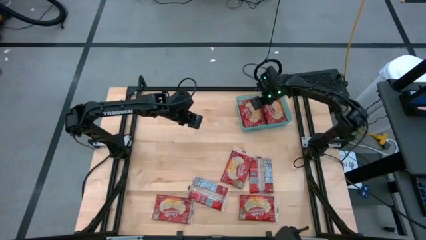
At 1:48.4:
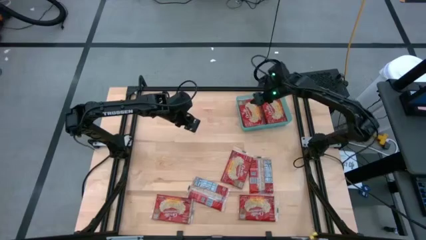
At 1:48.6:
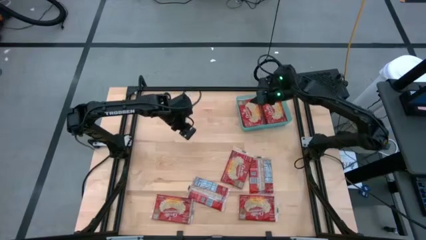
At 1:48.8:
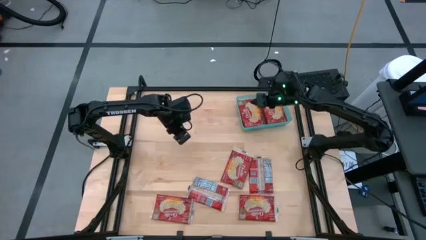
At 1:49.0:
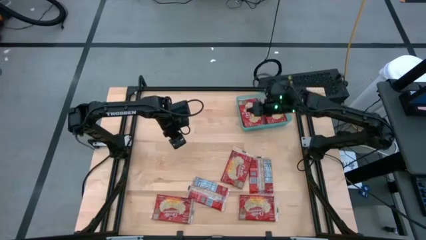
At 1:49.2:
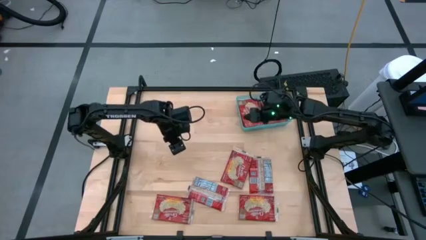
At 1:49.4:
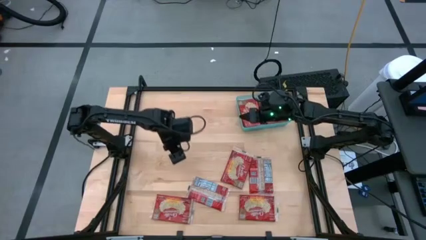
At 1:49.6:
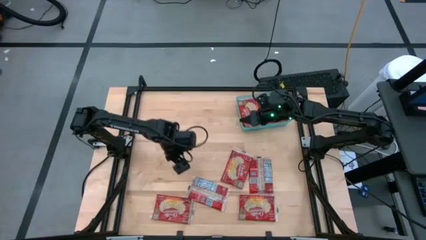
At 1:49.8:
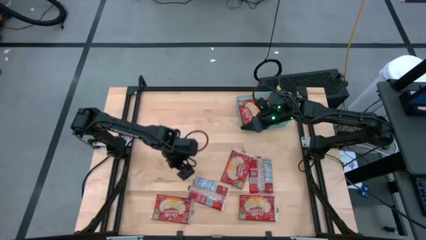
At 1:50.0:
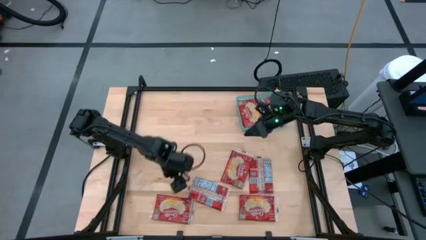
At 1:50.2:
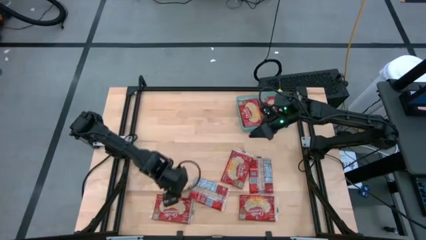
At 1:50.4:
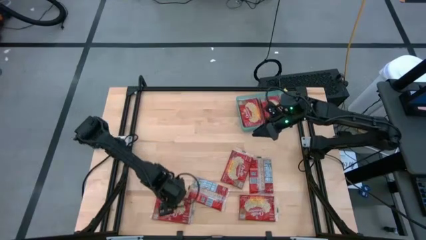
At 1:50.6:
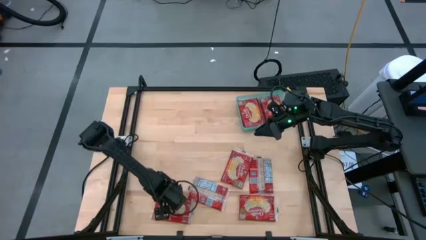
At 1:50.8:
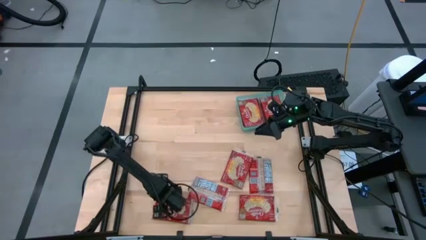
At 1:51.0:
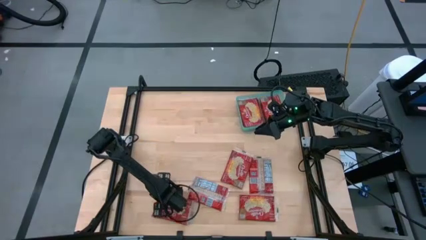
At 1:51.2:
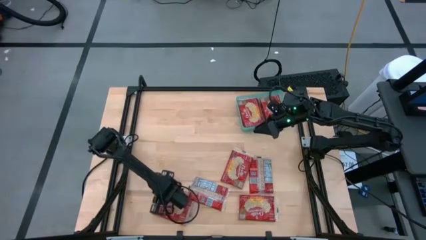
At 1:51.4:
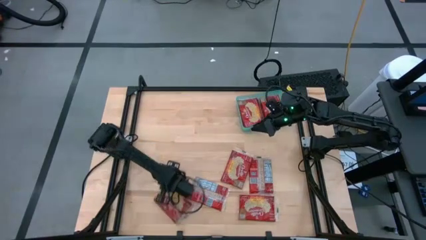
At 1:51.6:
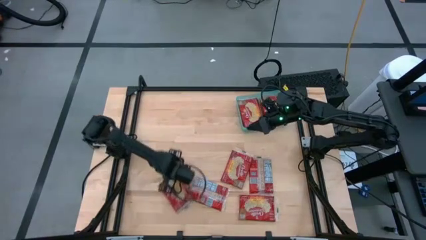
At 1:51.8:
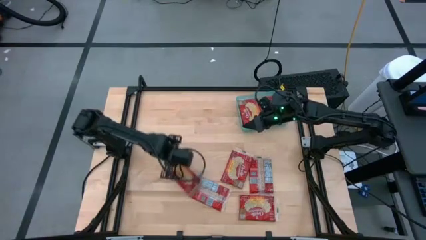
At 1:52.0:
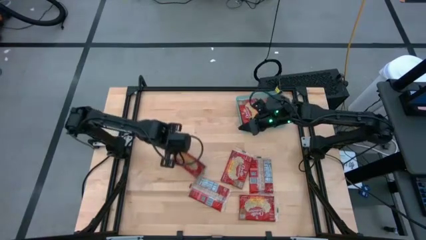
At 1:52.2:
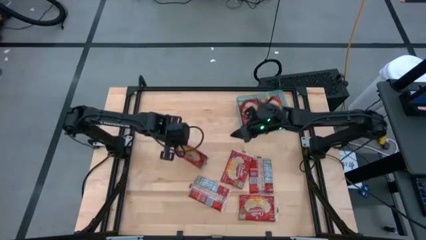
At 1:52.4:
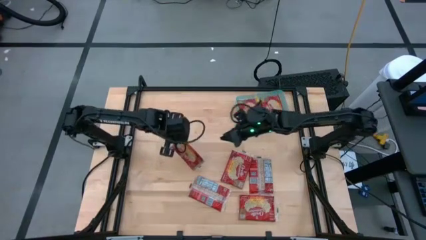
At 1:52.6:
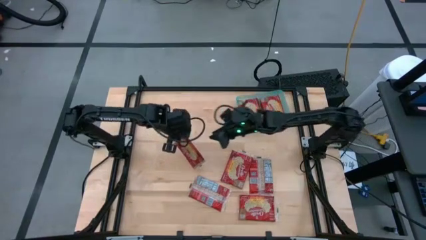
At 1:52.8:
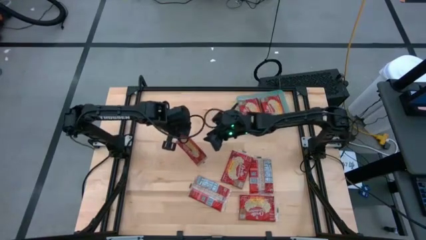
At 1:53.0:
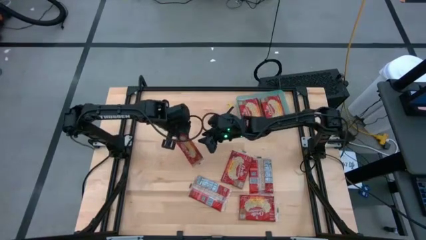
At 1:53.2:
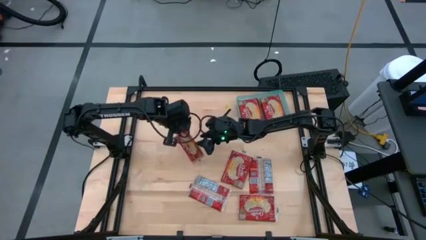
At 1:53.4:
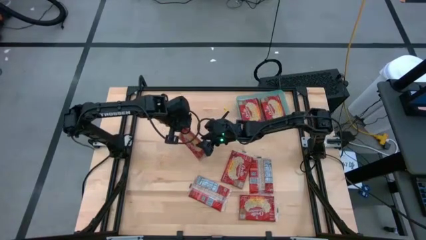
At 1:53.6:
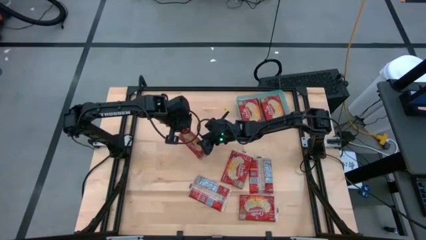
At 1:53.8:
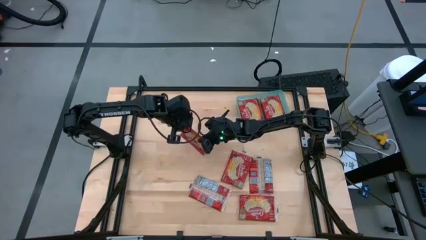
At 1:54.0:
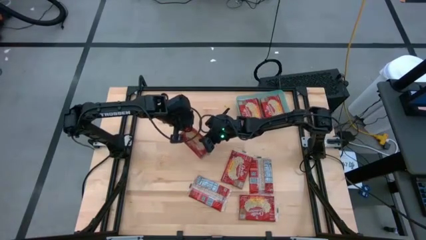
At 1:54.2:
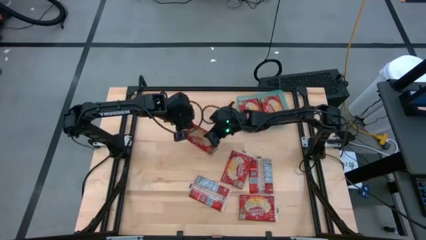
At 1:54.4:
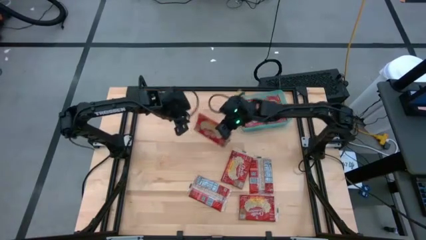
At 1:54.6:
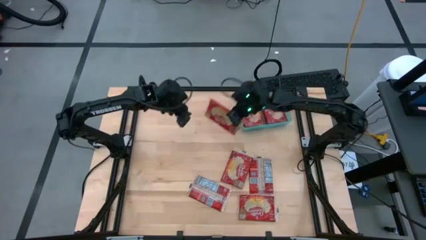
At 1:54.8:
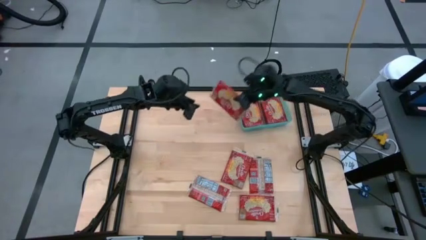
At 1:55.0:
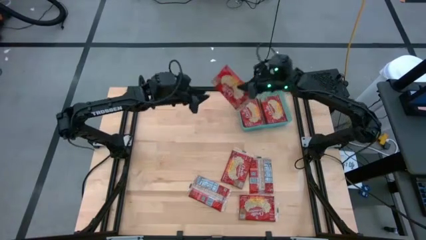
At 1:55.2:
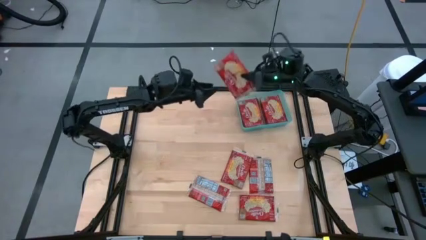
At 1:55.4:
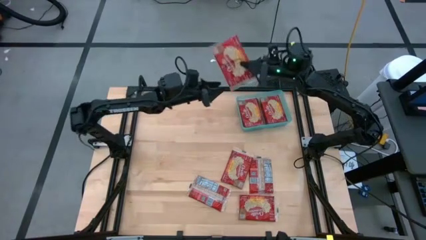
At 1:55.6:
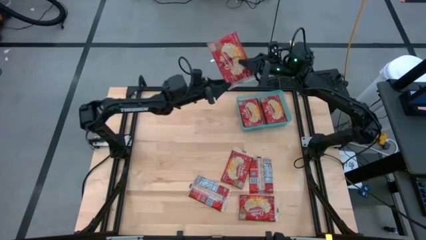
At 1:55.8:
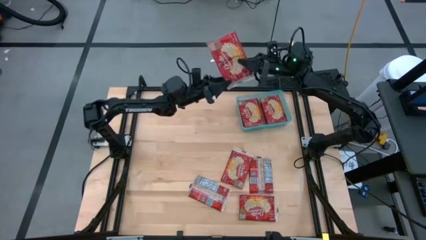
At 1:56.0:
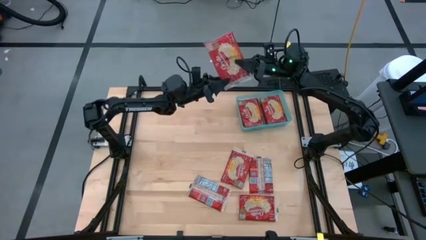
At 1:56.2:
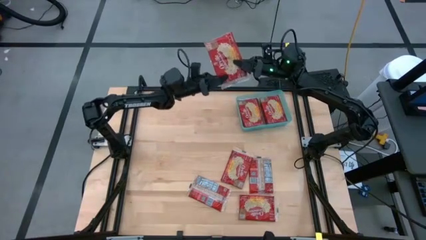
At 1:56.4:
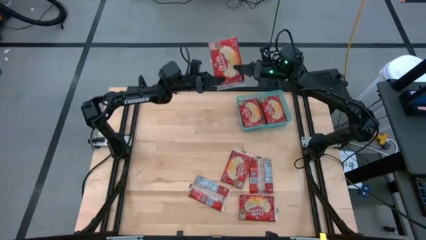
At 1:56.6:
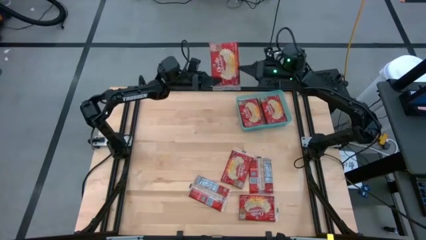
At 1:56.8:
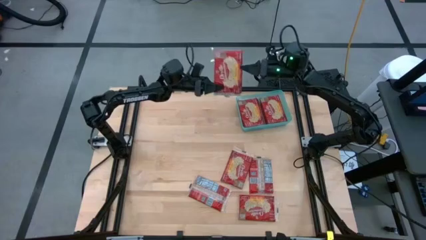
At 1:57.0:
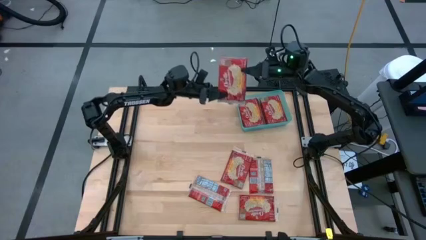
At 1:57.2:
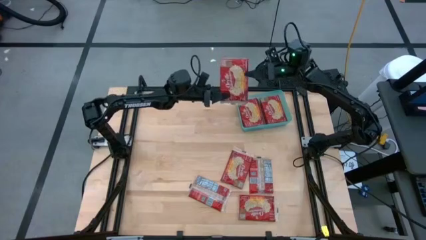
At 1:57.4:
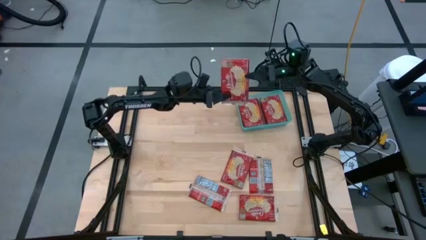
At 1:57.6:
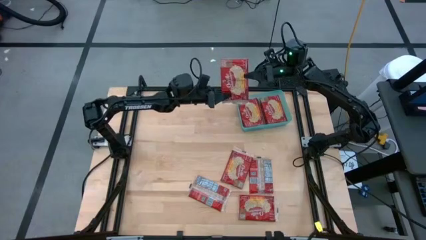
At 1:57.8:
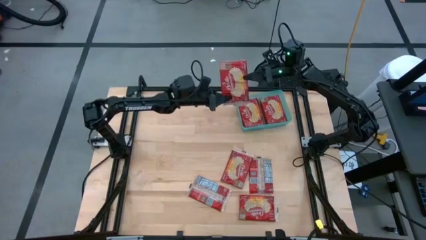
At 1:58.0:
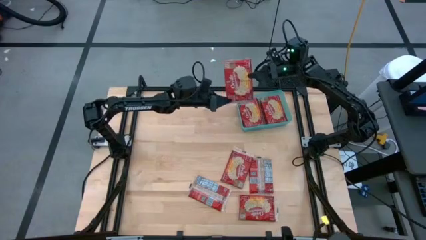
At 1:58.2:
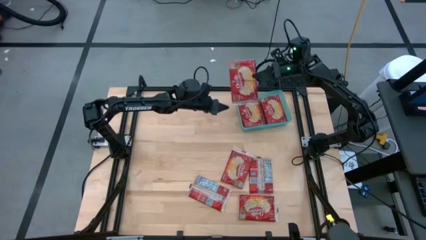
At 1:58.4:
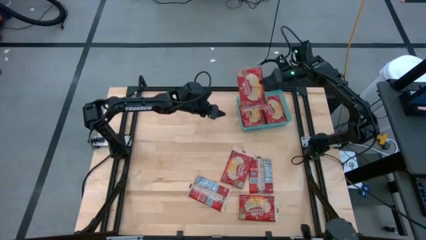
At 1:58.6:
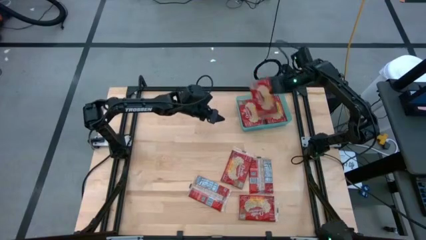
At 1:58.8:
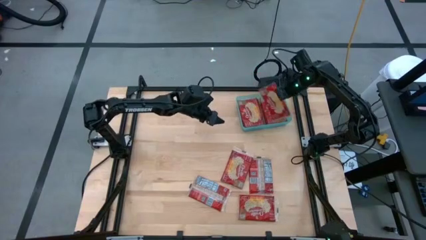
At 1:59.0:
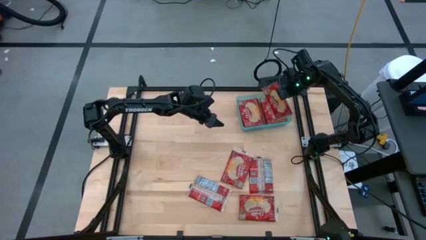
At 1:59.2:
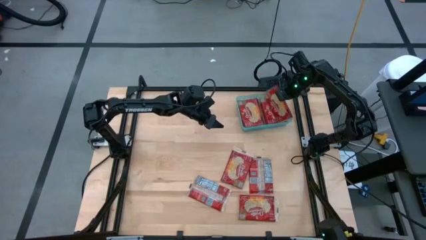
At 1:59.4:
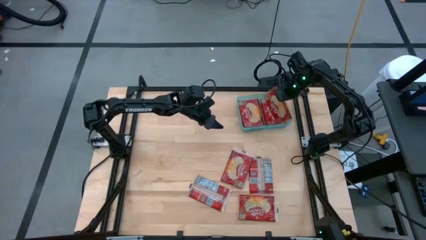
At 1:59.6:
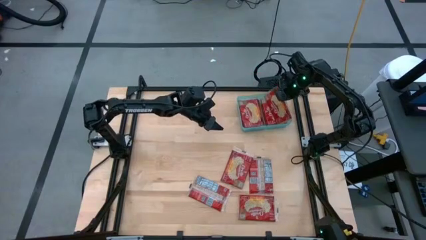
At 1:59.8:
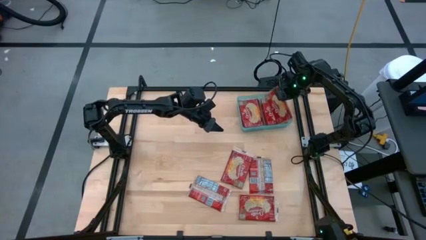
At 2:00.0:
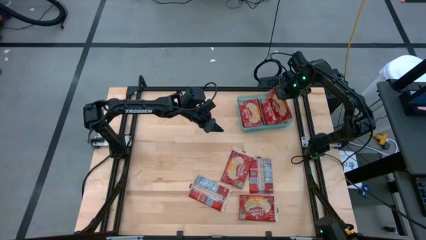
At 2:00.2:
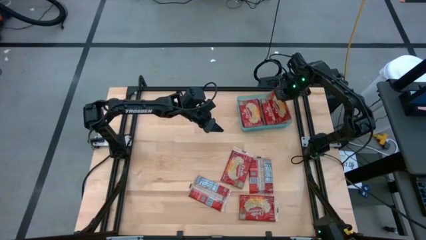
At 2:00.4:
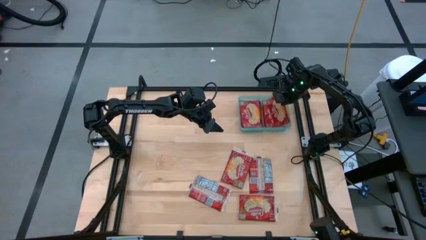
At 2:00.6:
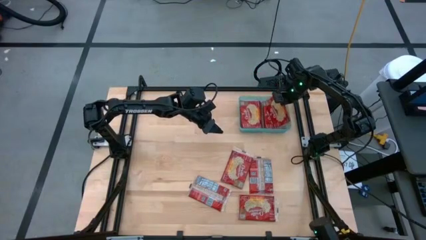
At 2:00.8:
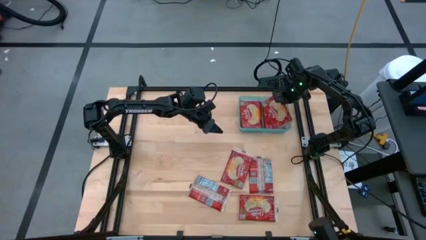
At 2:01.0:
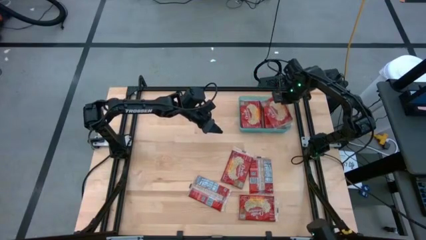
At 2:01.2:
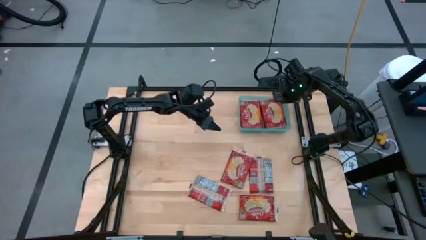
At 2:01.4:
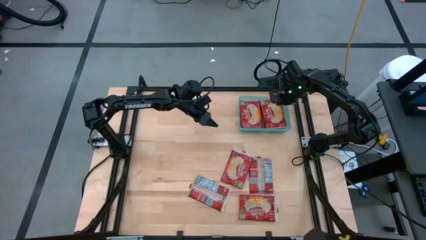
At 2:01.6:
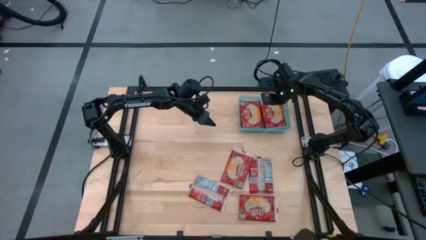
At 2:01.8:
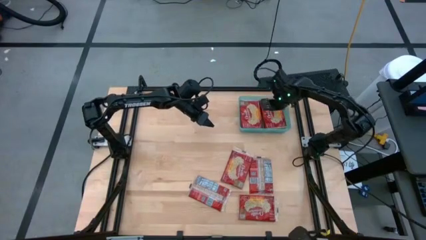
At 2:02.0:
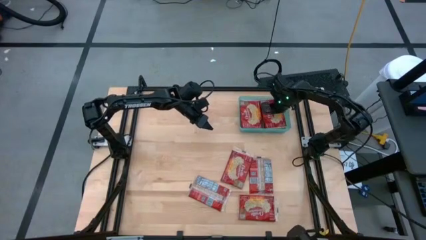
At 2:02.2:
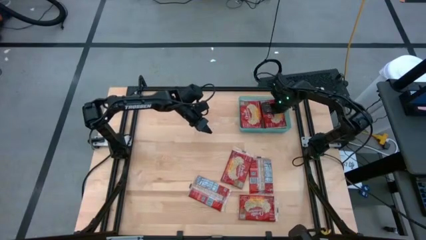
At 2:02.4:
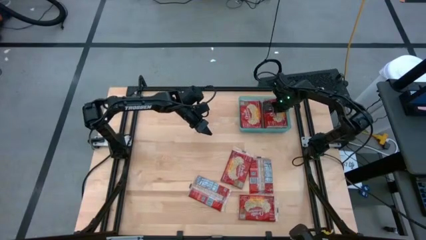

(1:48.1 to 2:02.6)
Task: Sort popcorn bags into baskets
Put the red popcorn bag into the light blue bin

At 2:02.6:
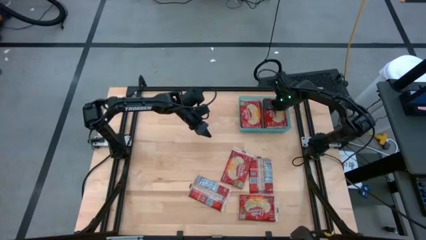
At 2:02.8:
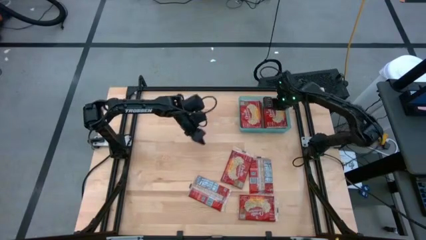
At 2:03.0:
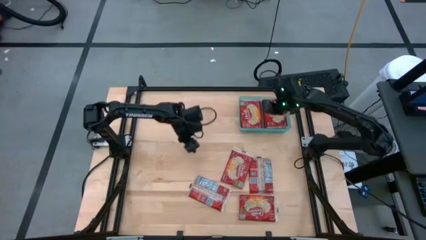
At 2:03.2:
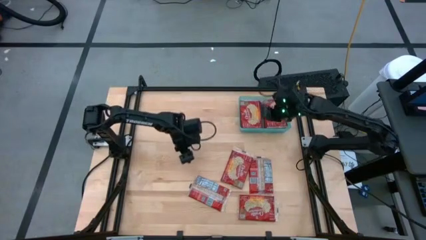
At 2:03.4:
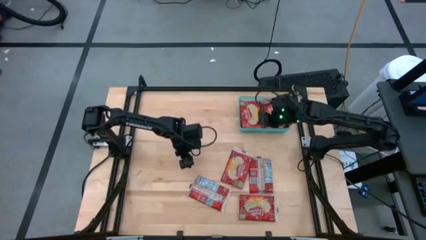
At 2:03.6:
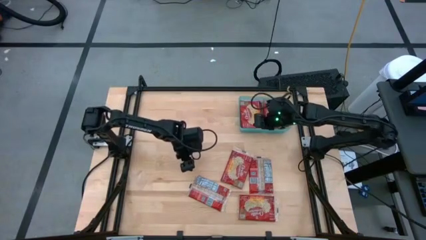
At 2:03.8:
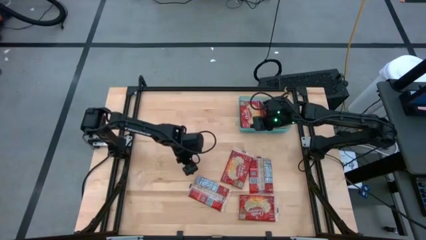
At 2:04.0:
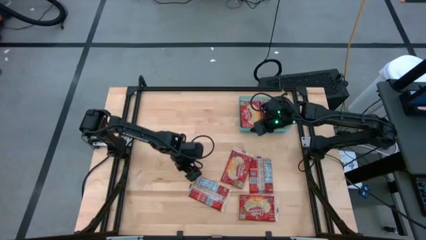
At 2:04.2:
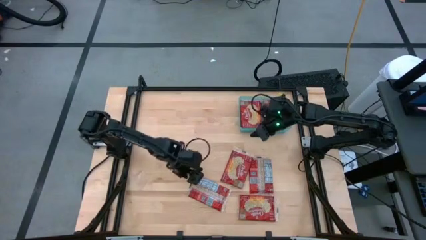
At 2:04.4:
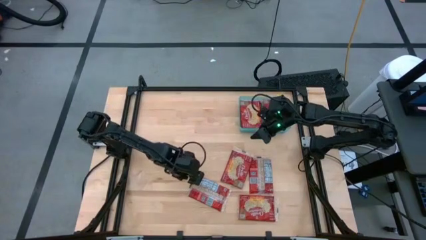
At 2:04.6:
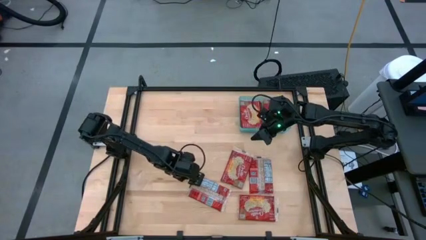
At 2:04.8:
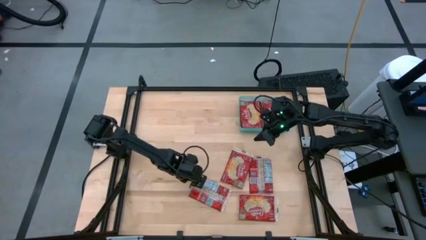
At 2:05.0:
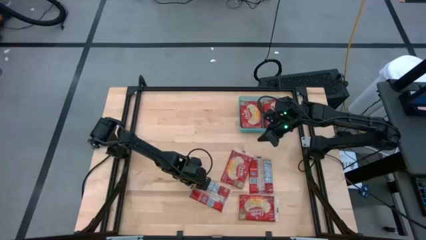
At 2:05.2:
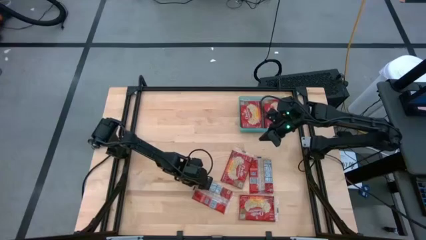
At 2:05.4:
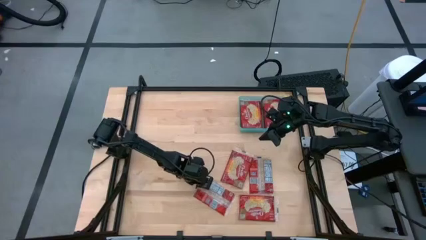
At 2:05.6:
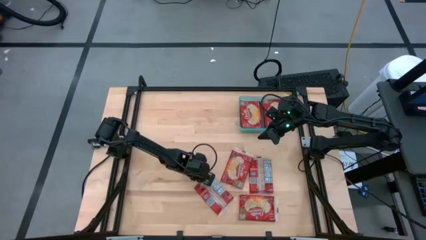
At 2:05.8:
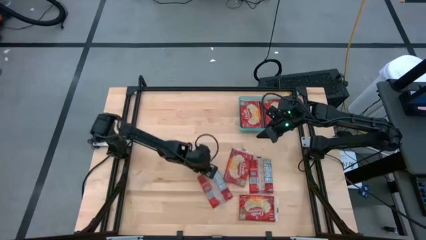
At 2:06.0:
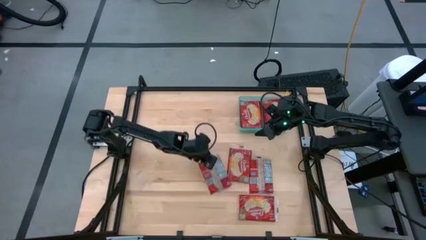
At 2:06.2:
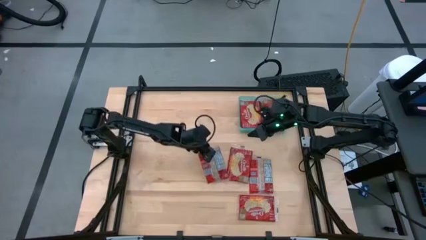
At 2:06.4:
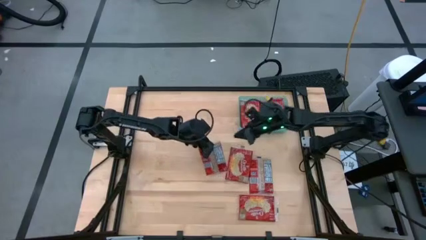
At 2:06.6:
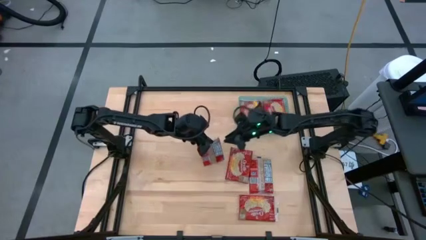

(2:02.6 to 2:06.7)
Put the red popcorn bag into the light blue bin
